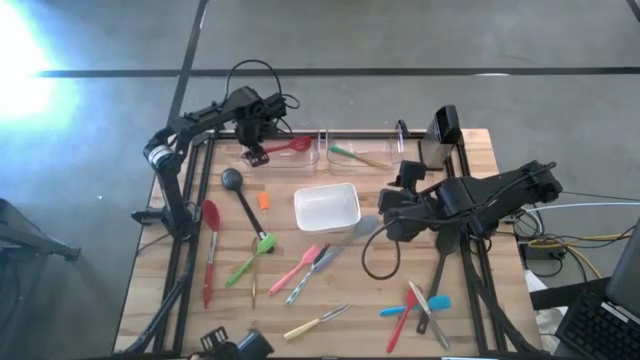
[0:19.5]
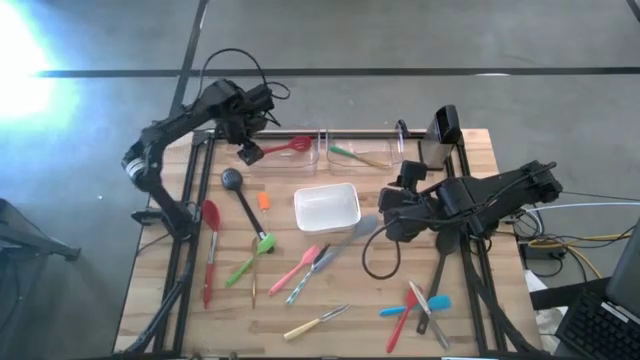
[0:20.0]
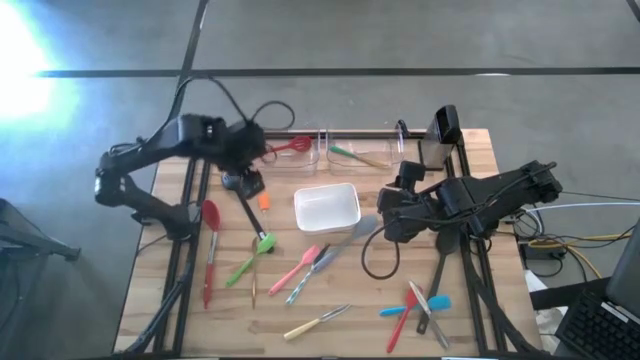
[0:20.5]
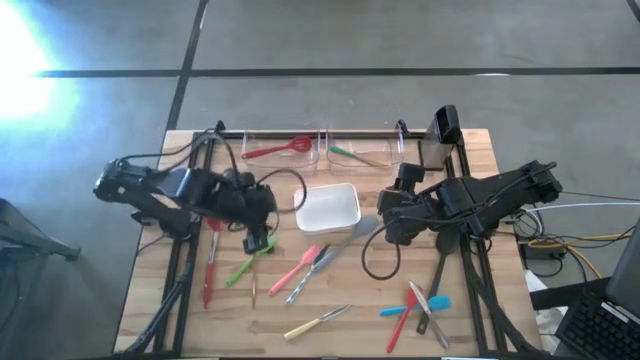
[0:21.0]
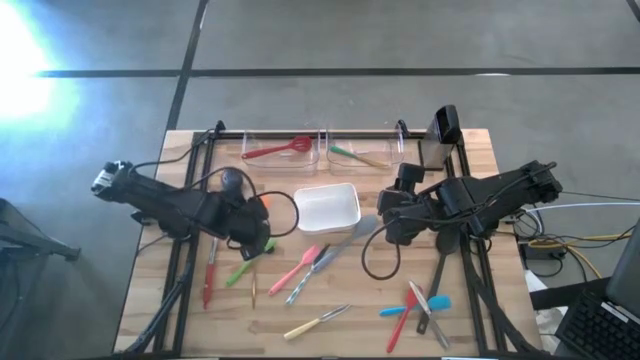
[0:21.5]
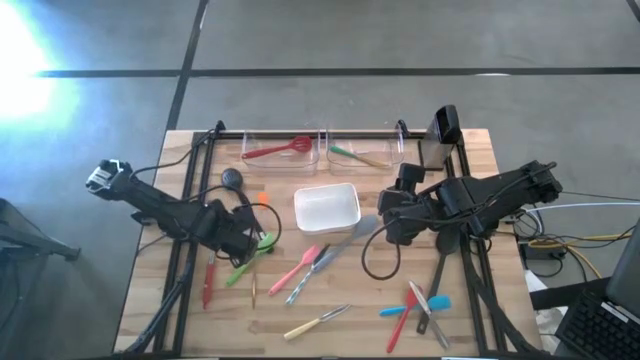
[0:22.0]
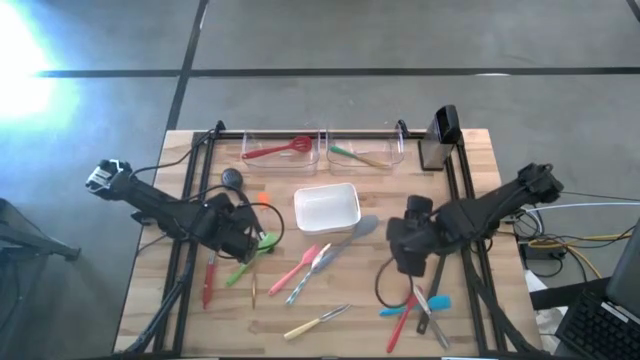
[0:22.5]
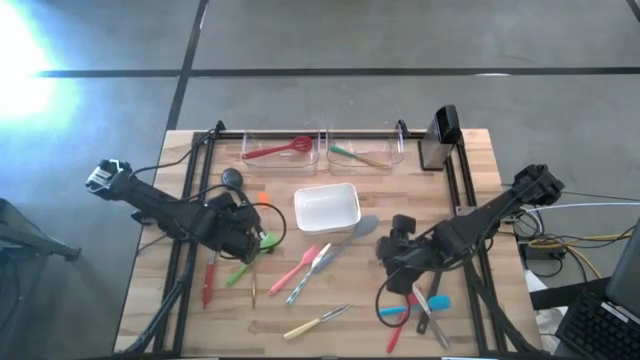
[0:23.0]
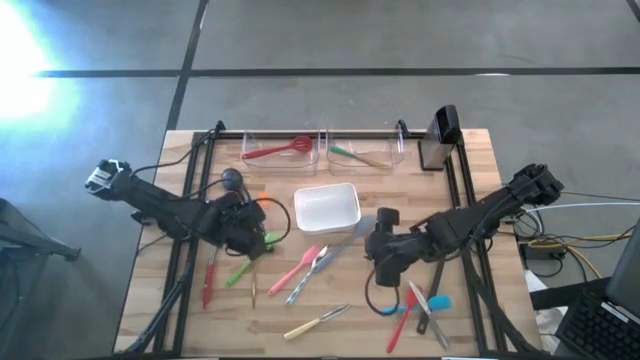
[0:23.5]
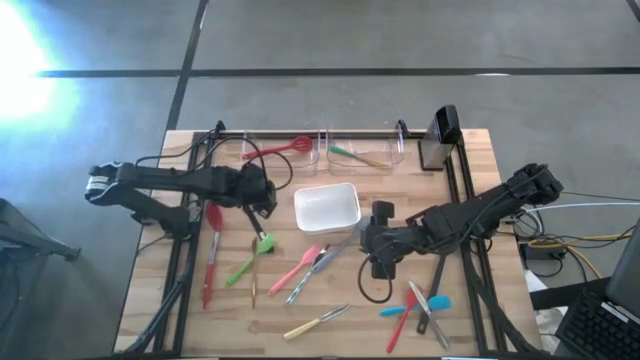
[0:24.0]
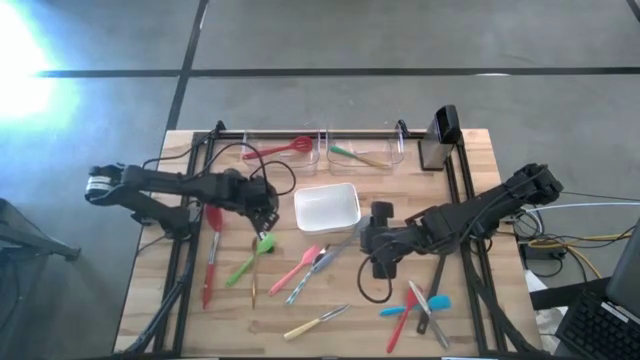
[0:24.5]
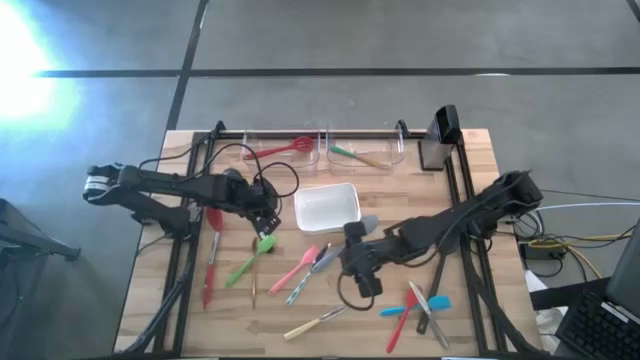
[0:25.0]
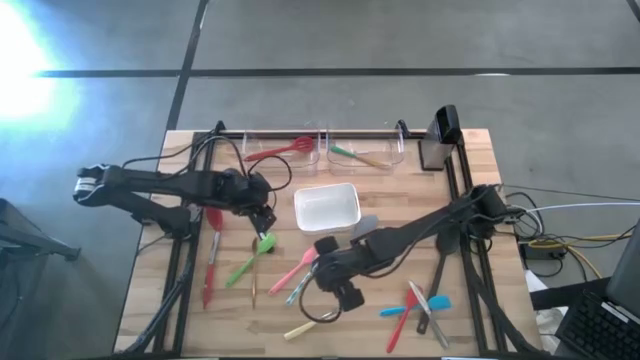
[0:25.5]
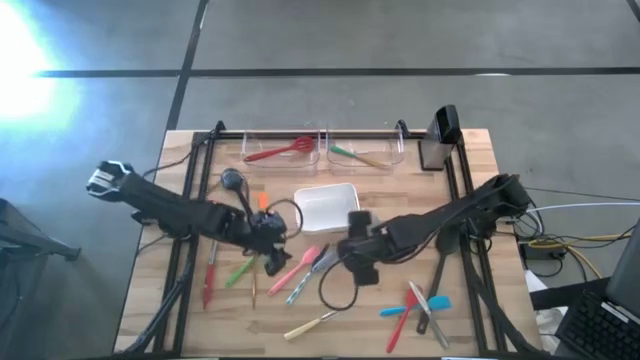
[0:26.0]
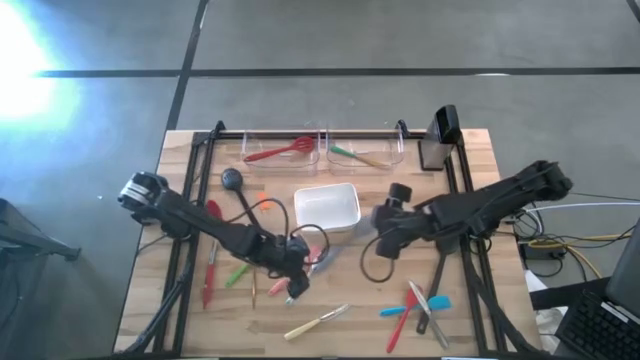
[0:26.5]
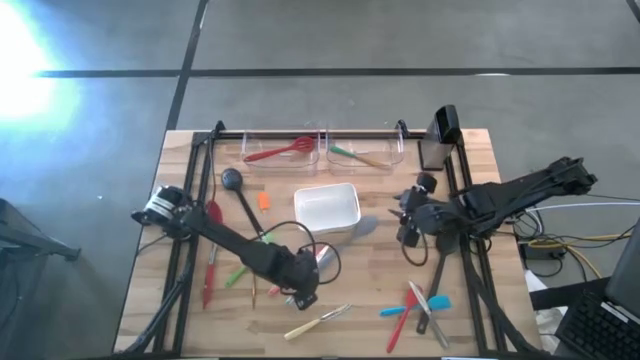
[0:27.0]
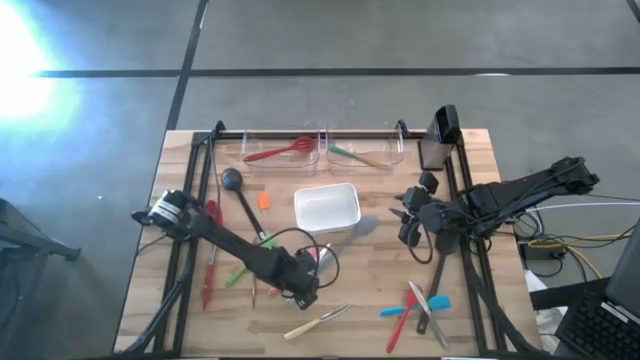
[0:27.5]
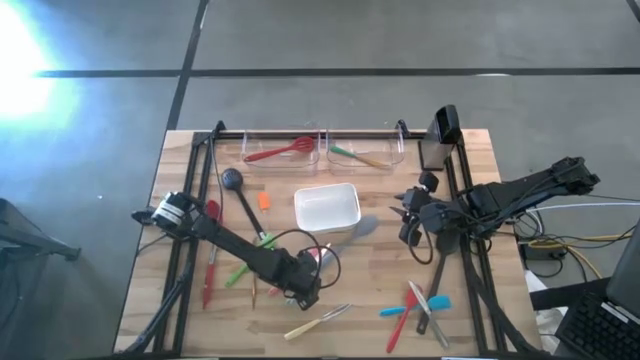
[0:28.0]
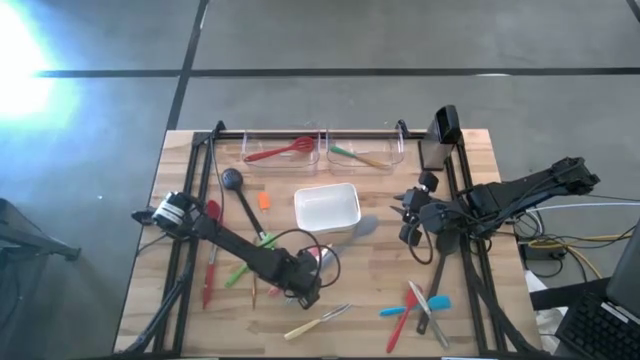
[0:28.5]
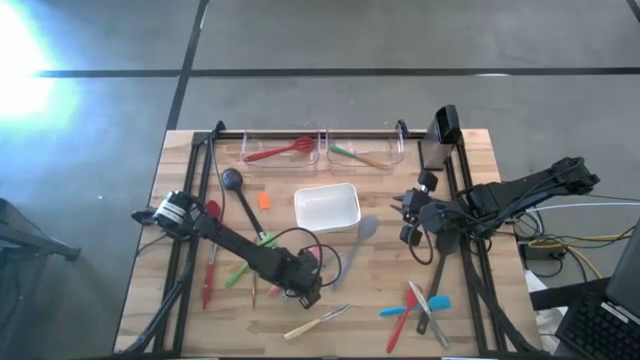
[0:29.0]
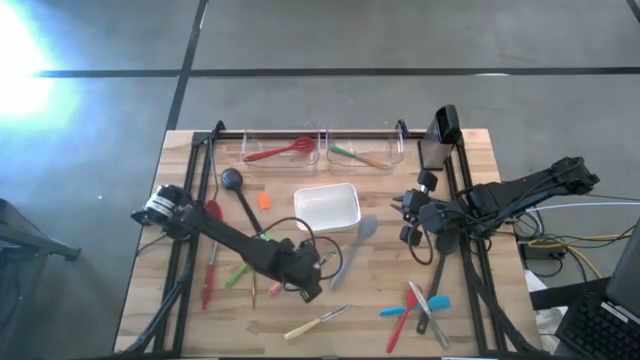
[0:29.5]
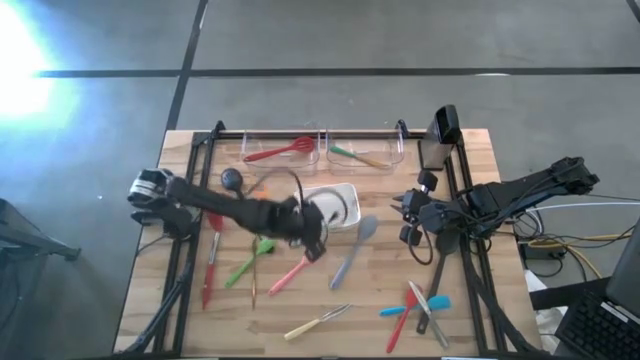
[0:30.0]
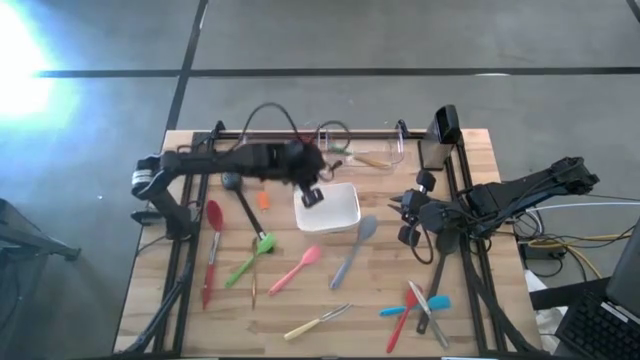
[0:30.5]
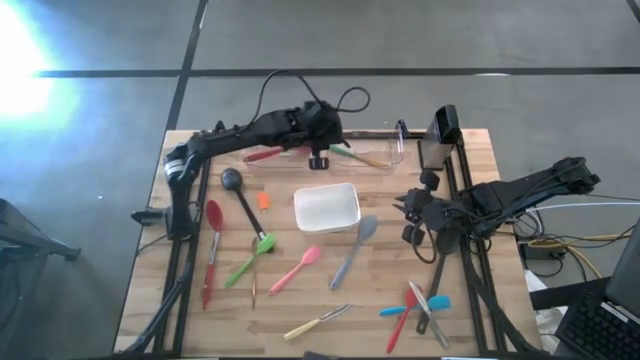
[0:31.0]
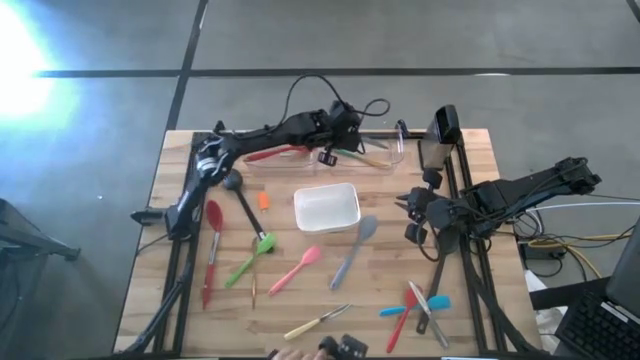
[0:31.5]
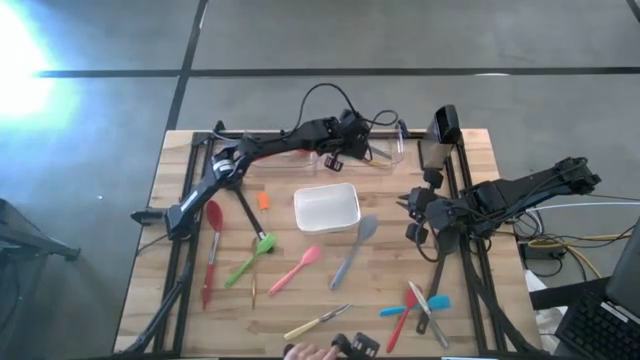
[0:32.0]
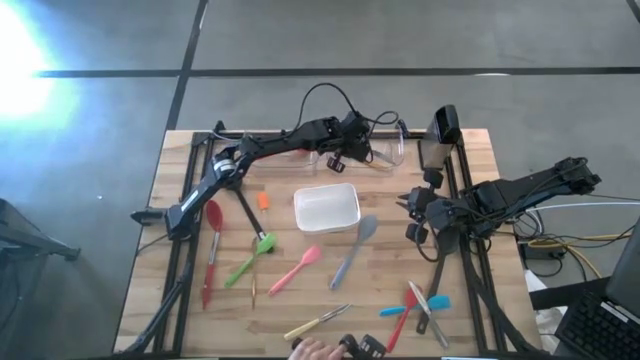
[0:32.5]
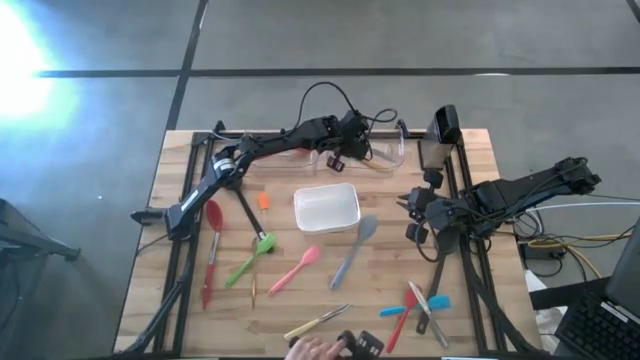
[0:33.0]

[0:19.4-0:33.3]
Task: Pick & Place Kitchen Items
Put the blue table knife into the right transparent bin

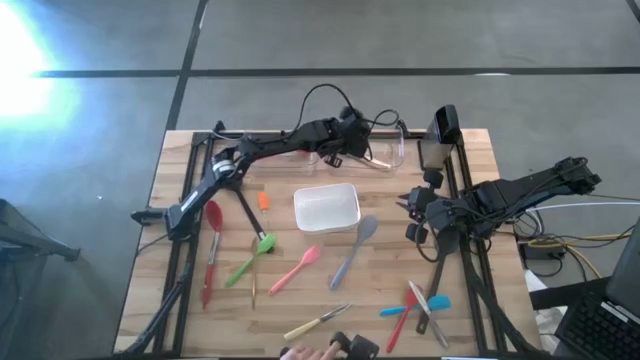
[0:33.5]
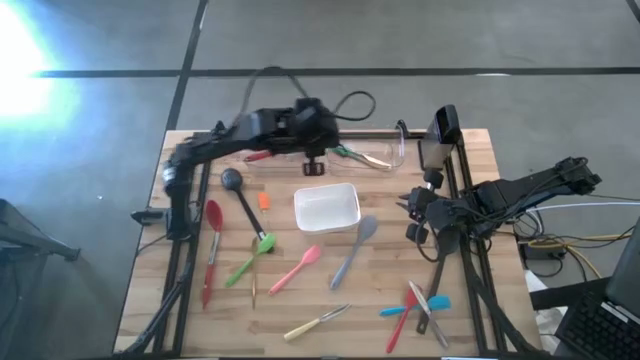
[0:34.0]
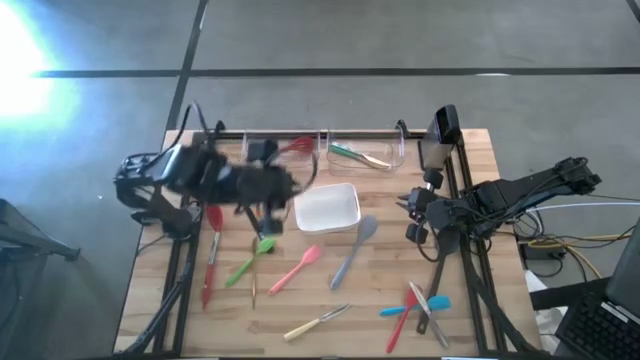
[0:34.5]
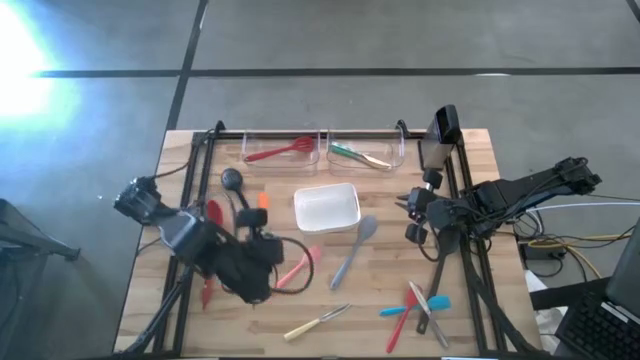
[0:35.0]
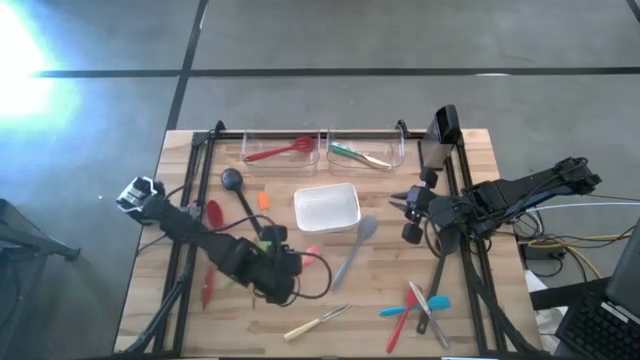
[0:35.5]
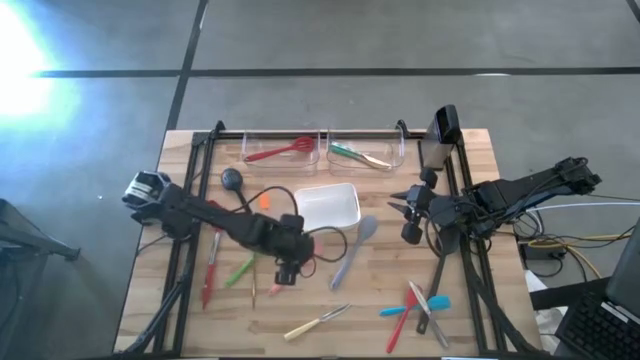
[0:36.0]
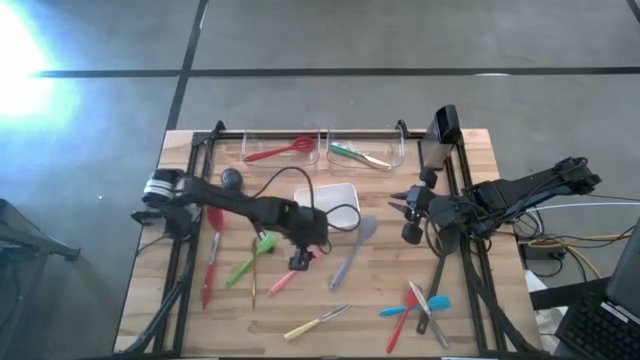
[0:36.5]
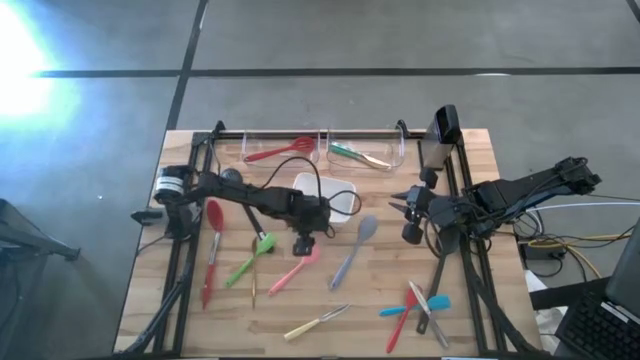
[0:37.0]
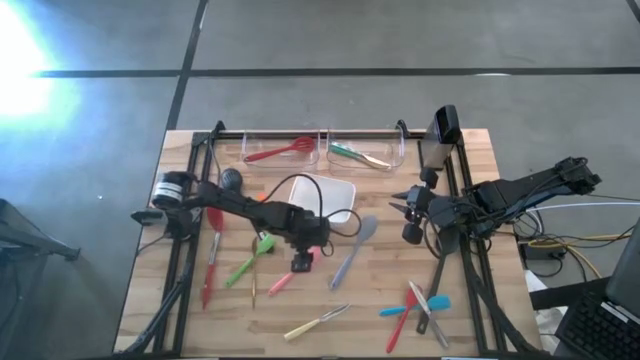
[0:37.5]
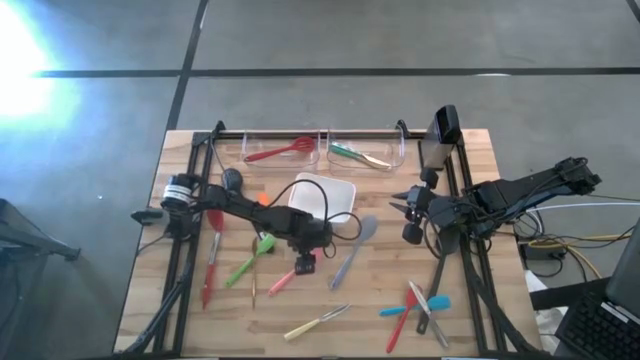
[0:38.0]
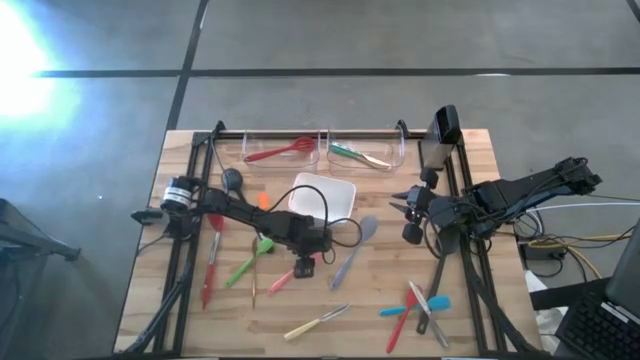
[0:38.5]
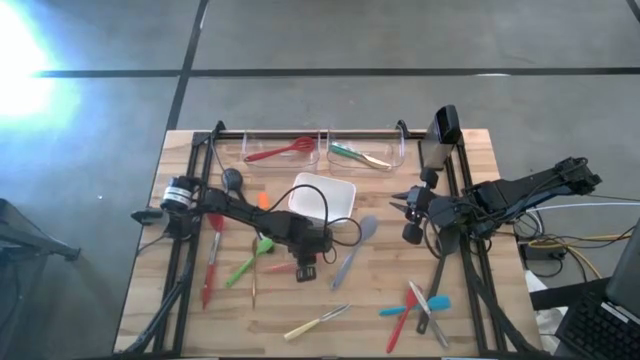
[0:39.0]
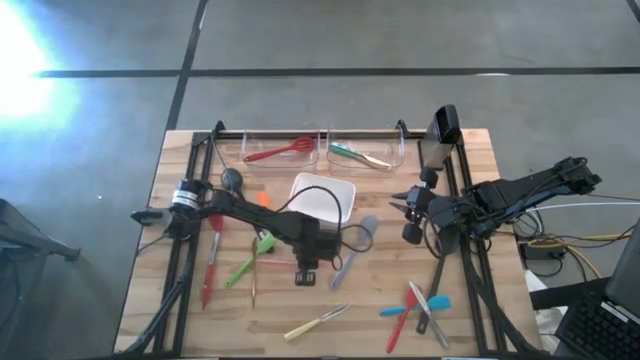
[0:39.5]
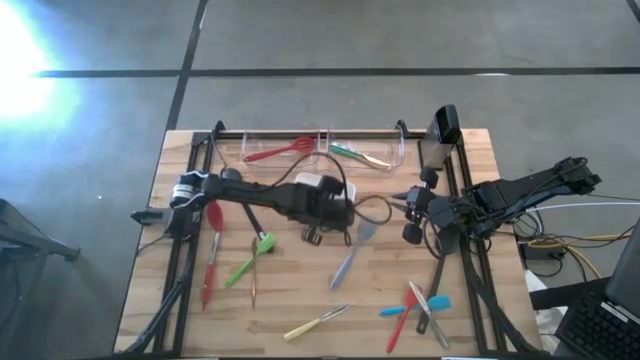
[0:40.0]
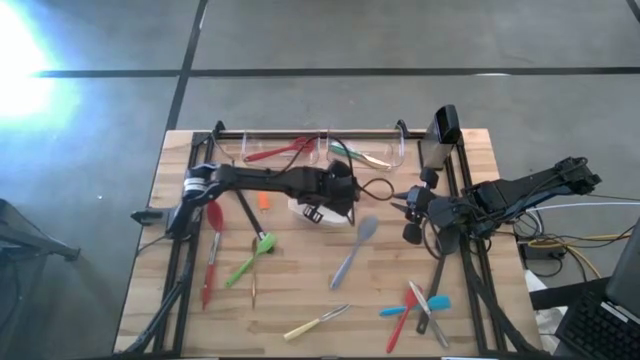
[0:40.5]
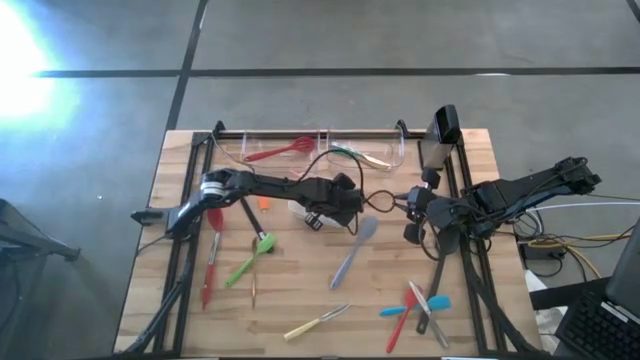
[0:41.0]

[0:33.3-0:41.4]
Put the pink spatula into the white bin

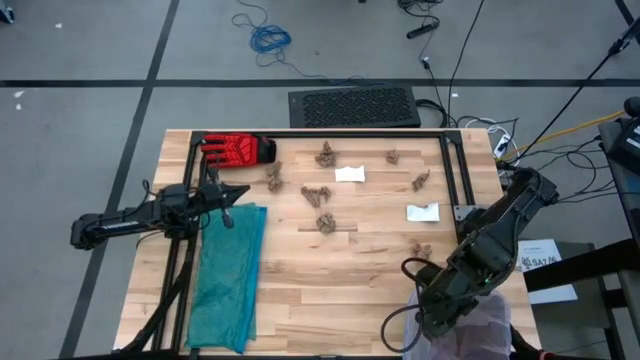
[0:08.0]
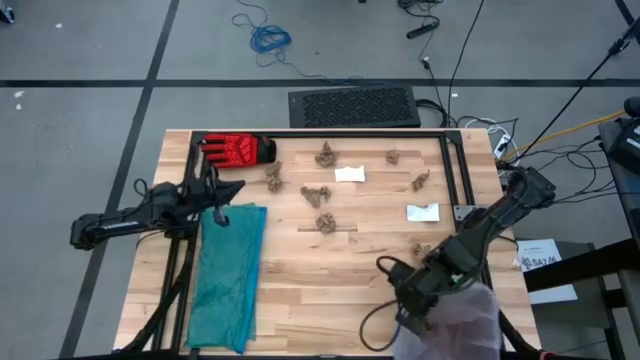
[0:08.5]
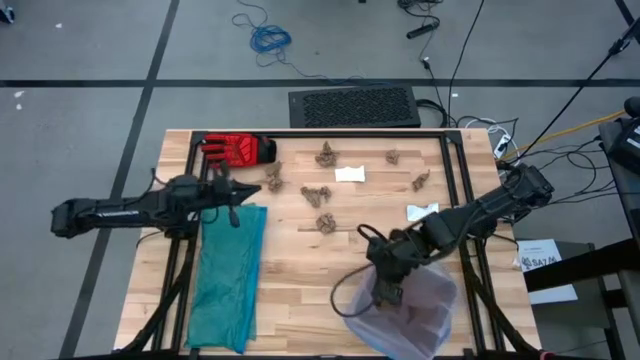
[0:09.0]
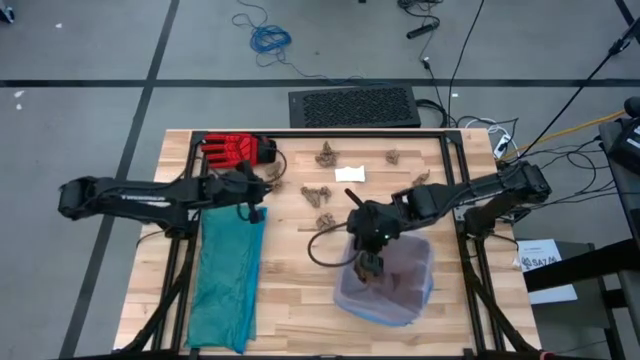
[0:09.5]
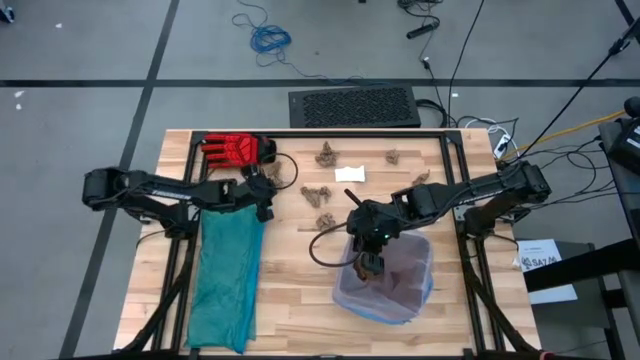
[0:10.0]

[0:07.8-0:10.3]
Task: place trash/remove bag and relplace
Move the black trash bin to the center of the table
